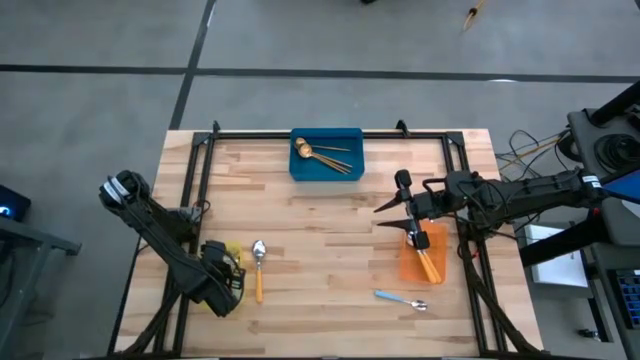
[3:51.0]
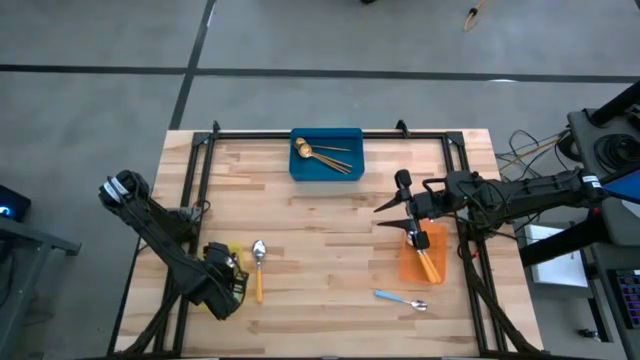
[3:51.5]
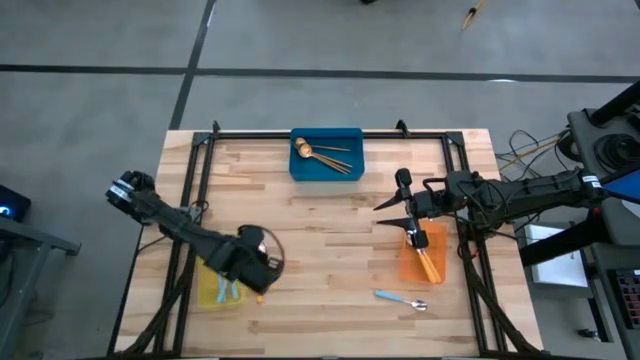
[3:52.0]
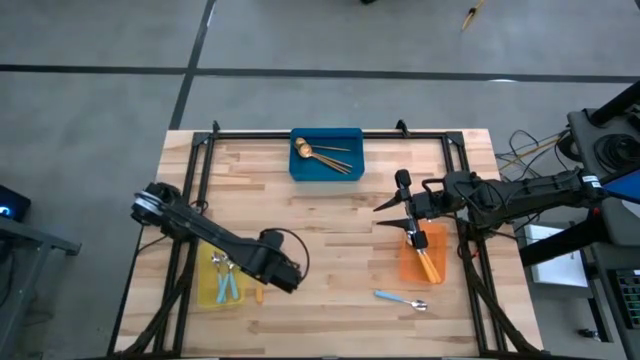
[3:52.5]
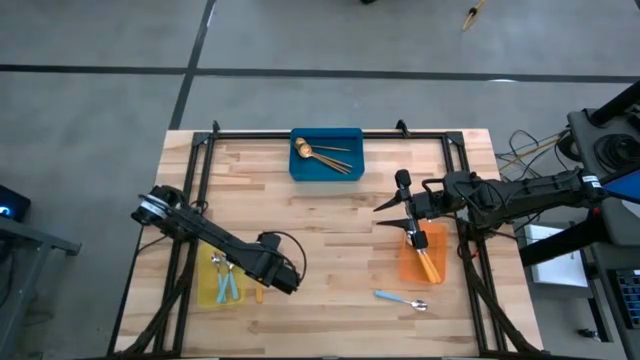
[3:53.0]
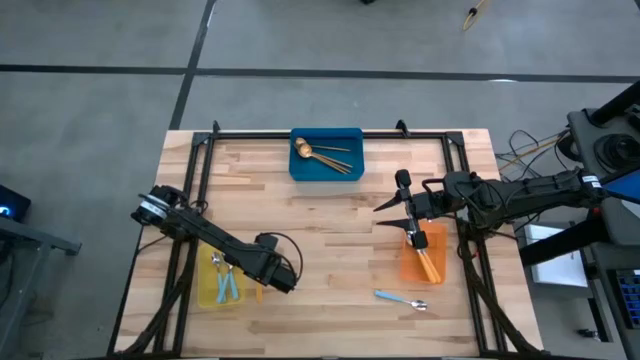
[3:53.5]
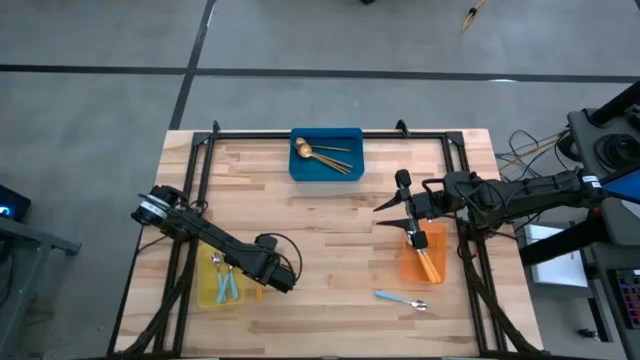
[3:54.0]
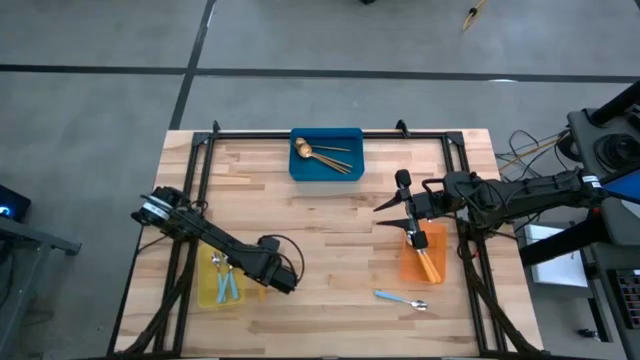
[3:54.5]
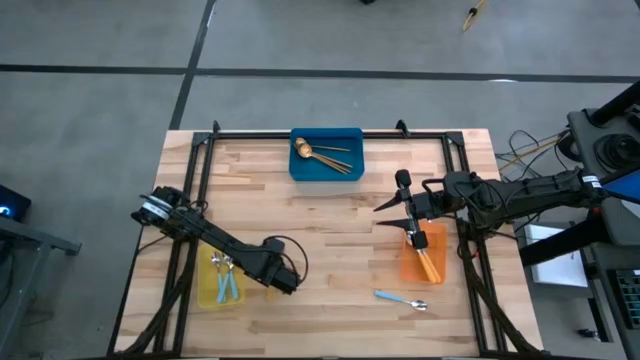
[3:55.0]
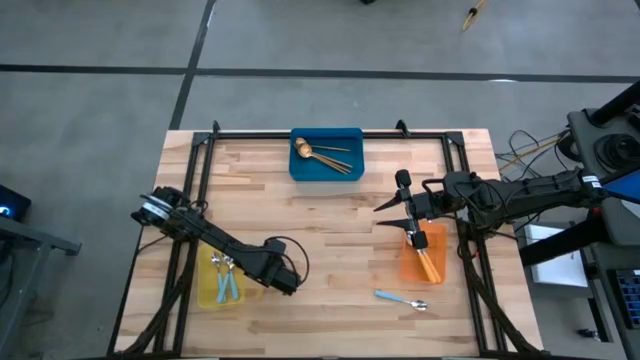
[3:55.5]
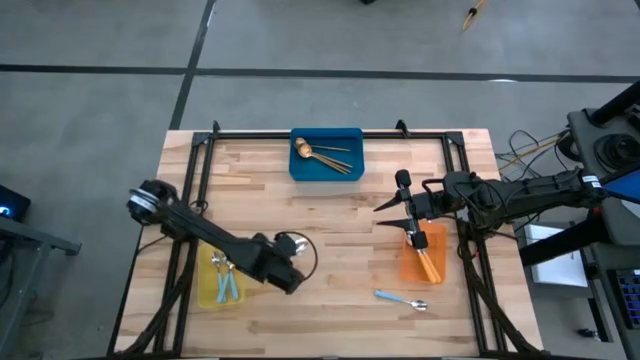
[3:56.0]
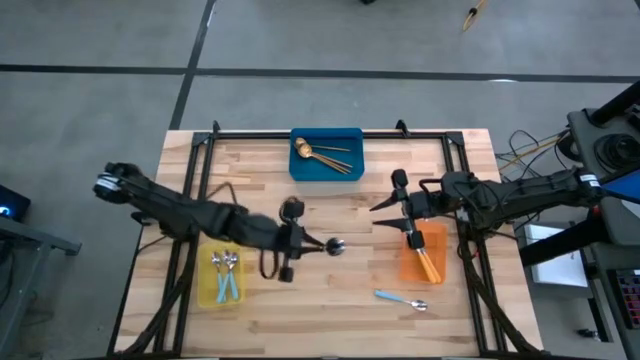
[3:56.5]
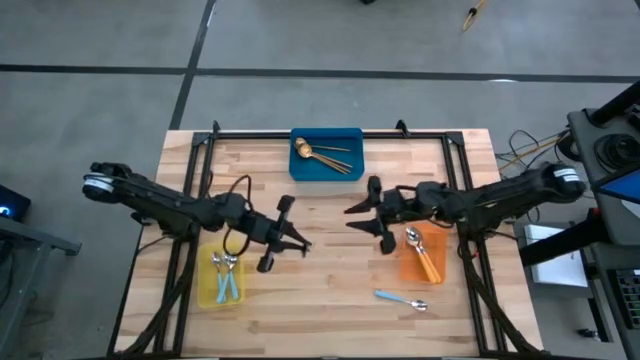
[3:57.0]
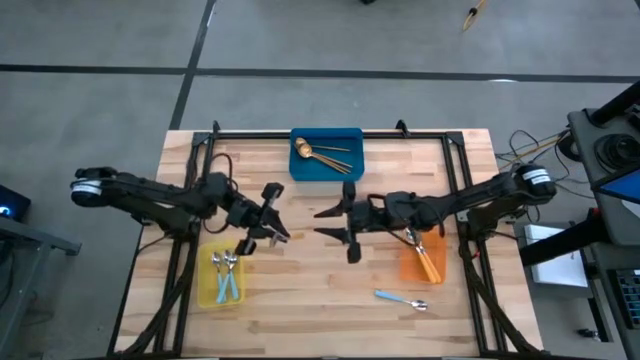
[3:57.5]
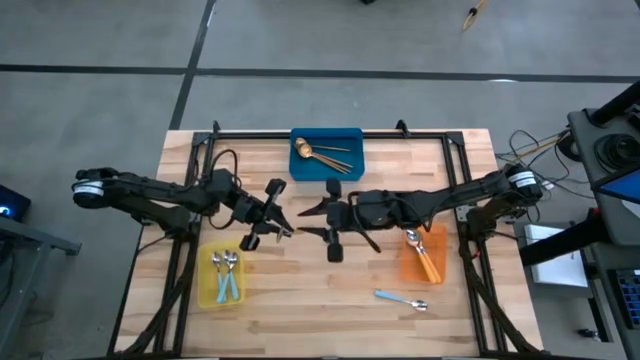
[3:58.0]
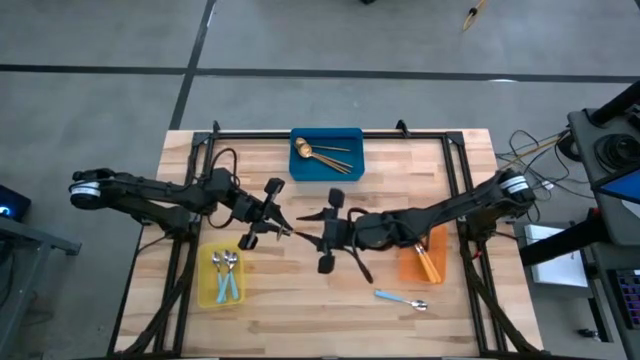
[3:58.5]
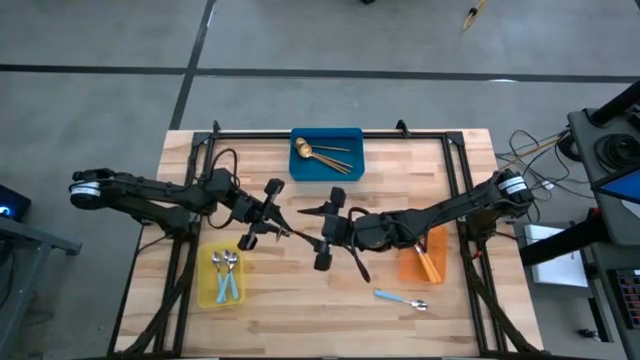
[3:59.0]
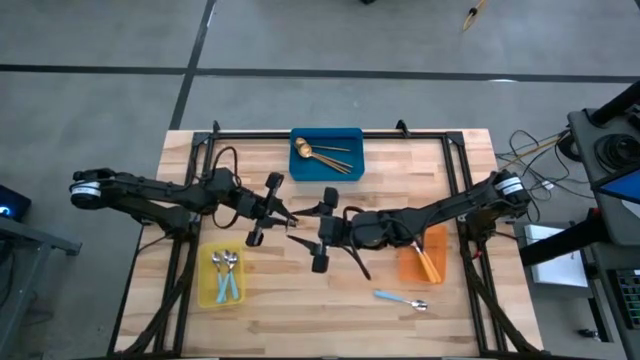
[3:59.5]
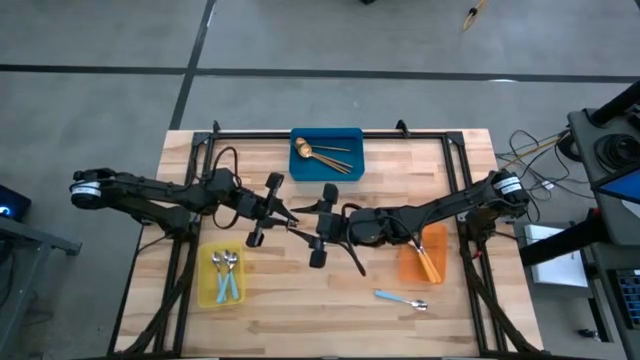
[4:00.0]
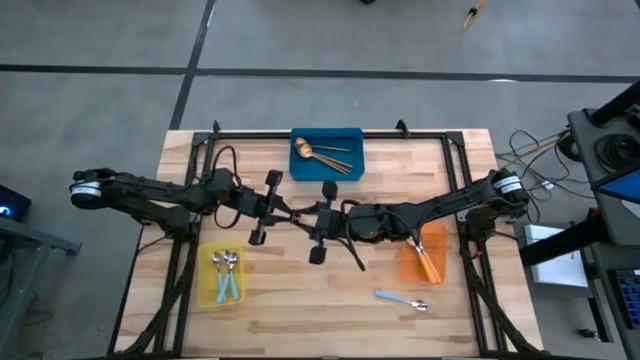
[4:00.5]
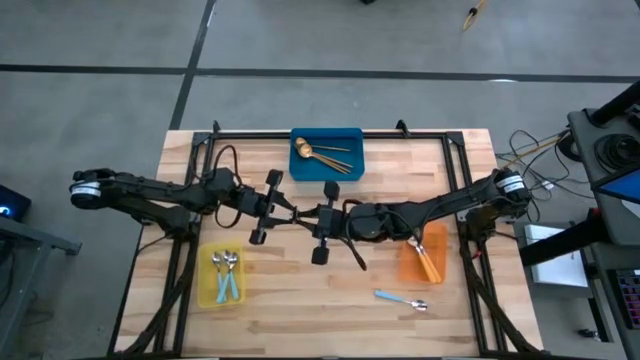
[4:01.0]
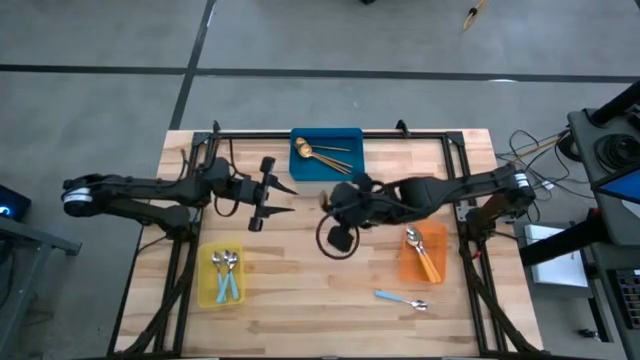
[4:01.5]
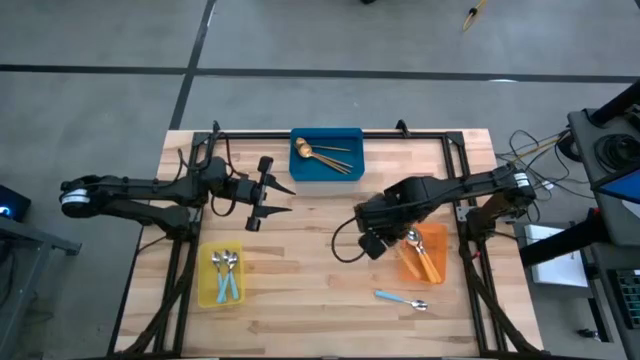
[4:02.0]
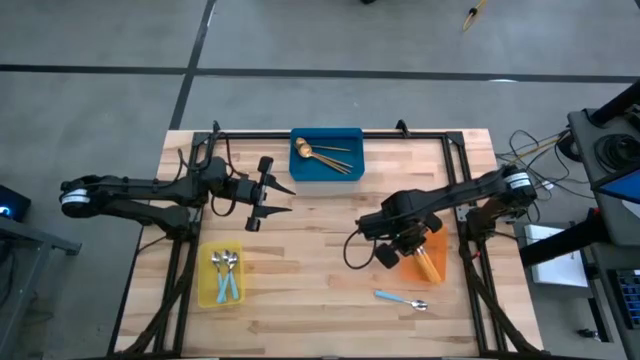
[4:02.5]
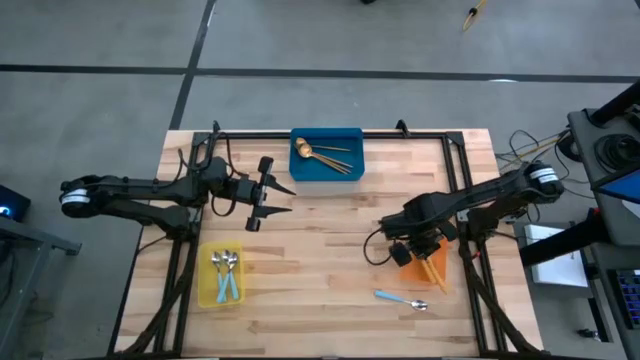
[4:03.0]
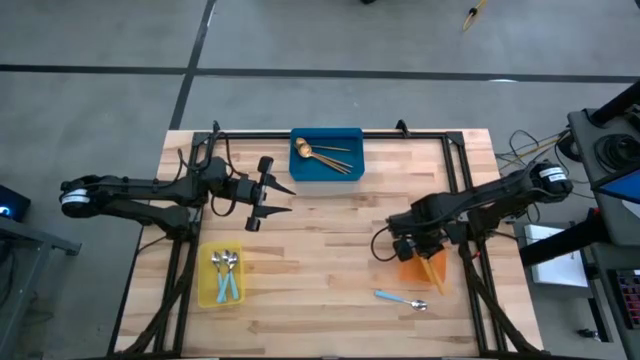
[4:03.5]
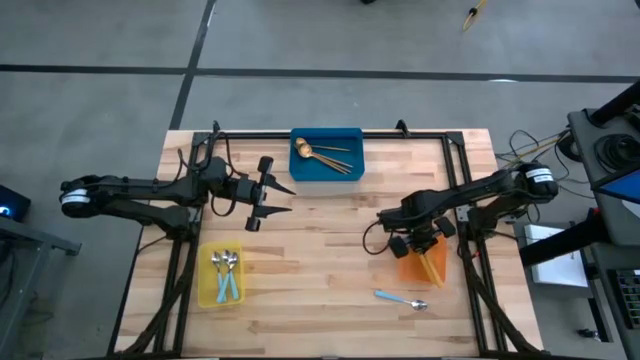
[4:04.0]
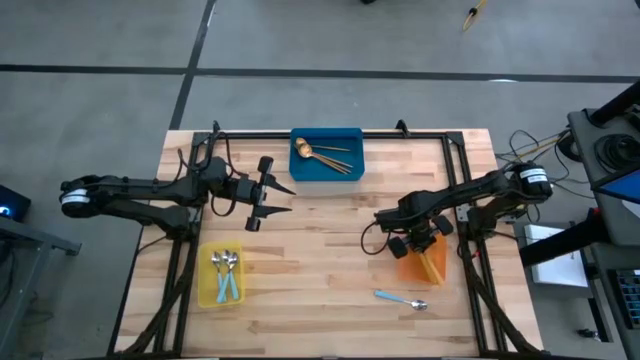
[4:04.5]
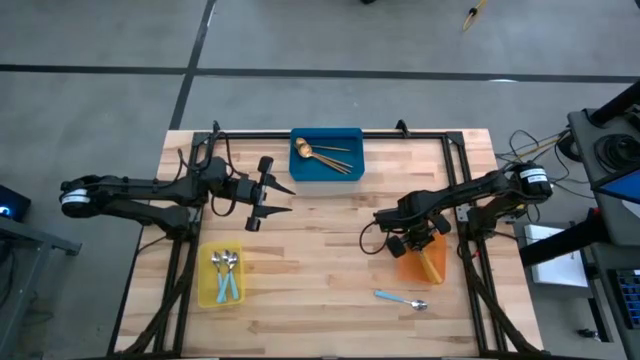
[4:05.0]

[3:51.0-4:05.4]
Task: Sort silverware by color (type)
Put the orange spoon into the orange bin

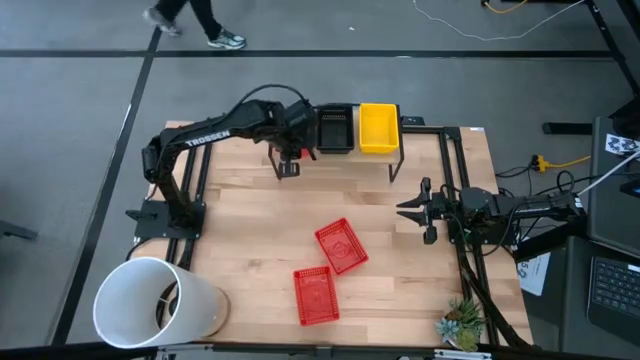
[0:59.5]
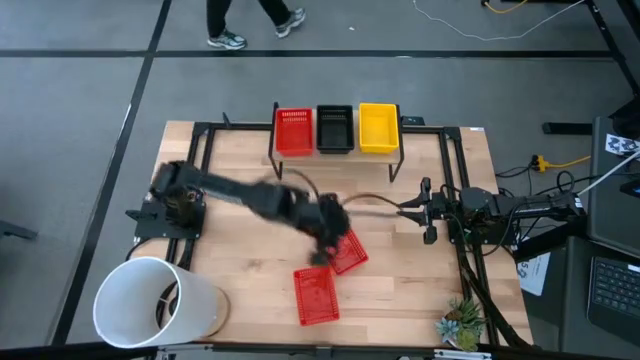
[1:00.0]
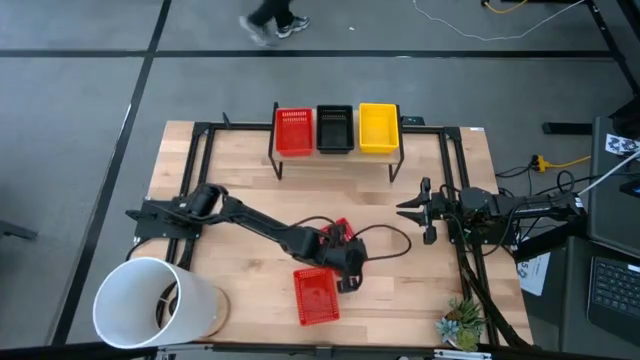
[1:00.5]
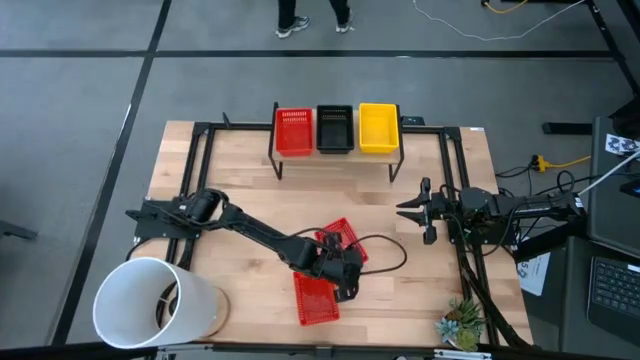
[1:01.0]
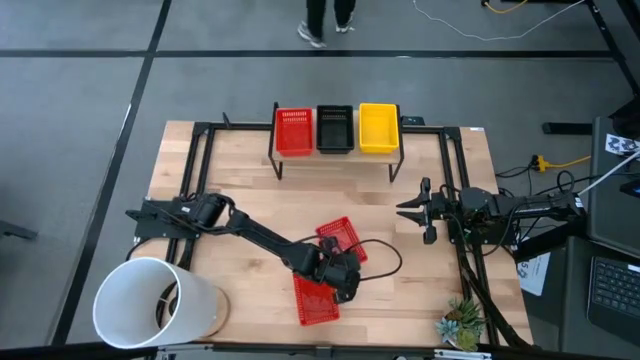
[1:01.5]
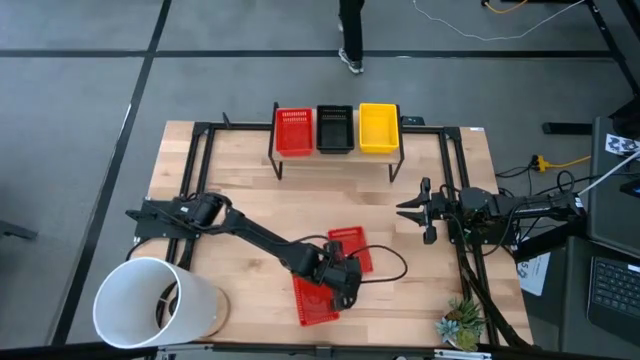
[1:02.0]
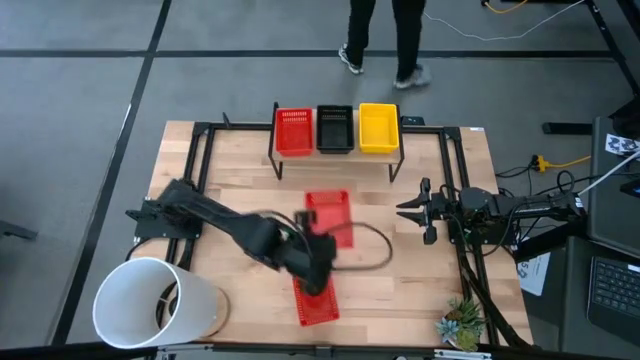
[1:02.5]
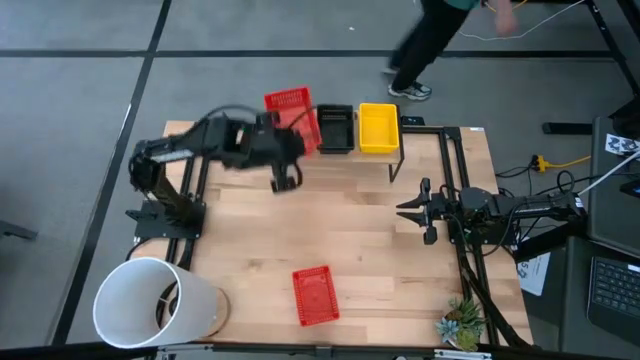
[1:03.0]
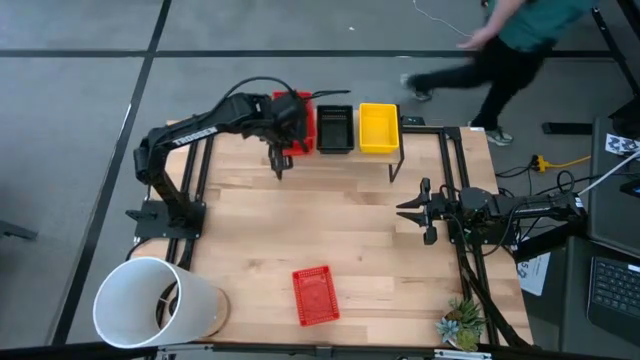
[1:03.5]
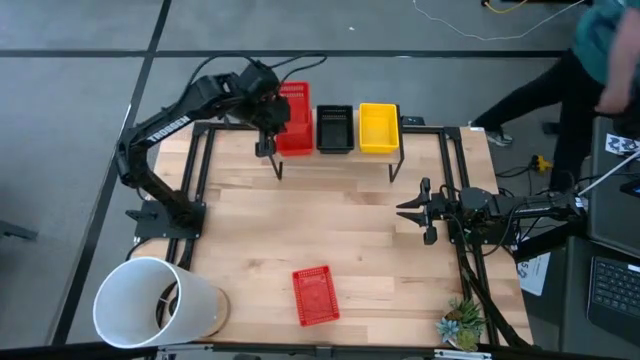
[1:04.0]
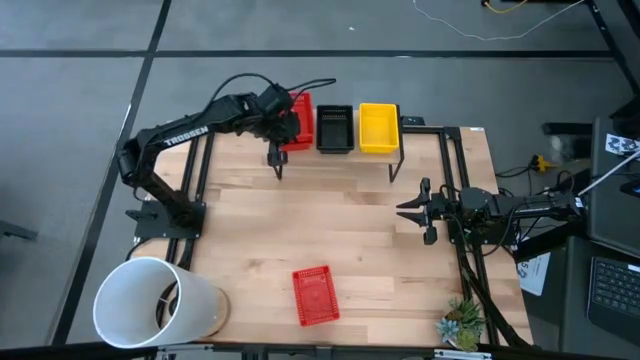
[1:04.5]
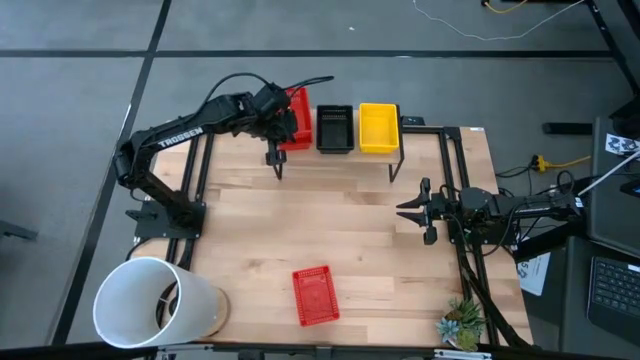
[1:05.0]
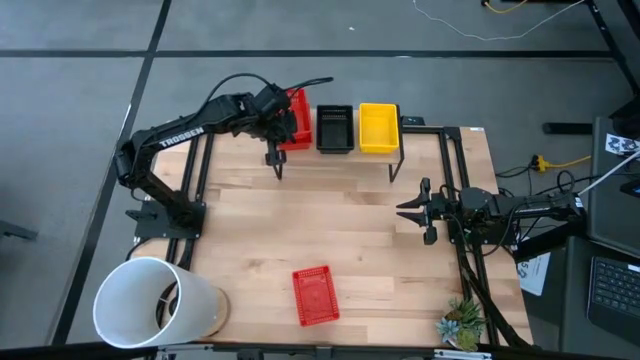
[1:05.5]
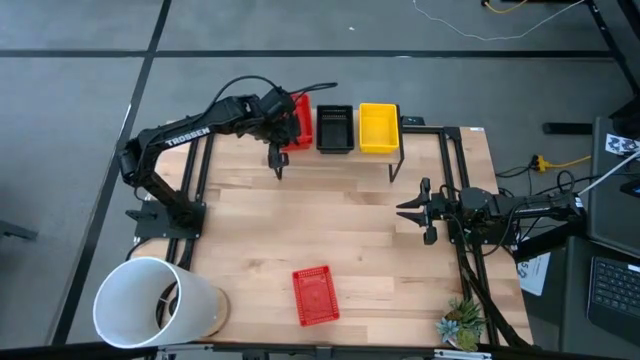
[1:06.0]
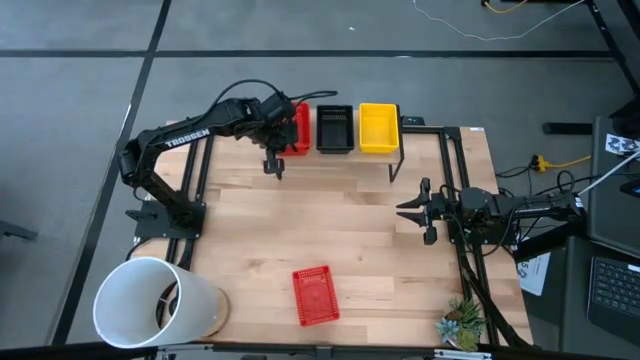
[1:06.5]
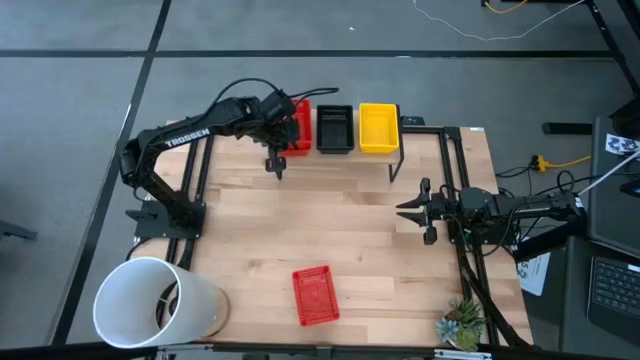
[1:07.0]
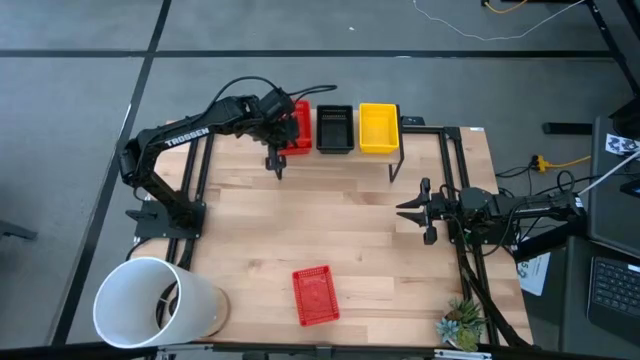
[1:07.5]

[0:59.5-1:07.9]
Task: Stack baskets on shelf by color
Stack the top red basket on top of the red basket on the shelf
